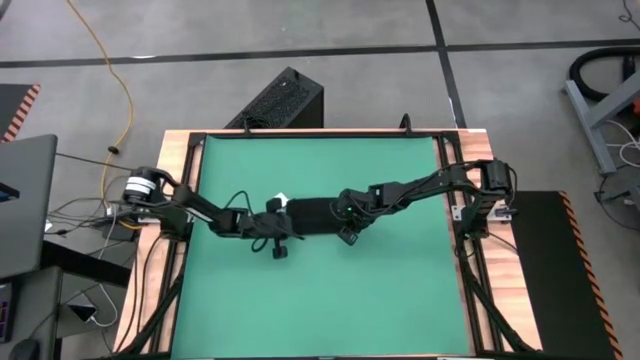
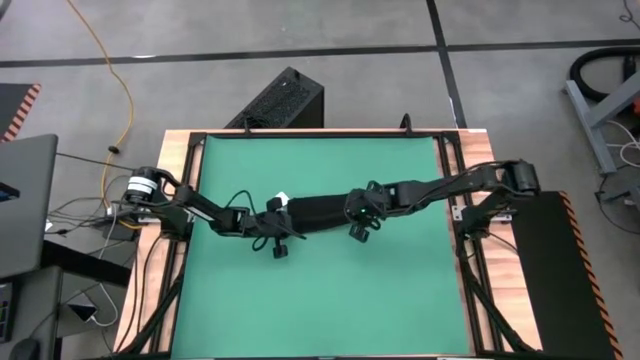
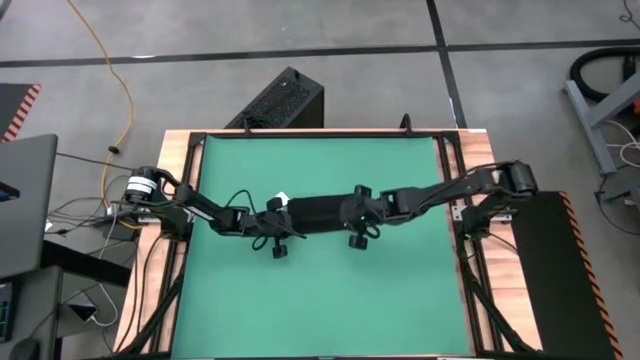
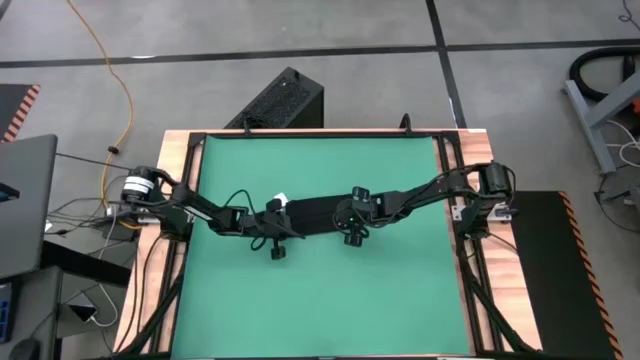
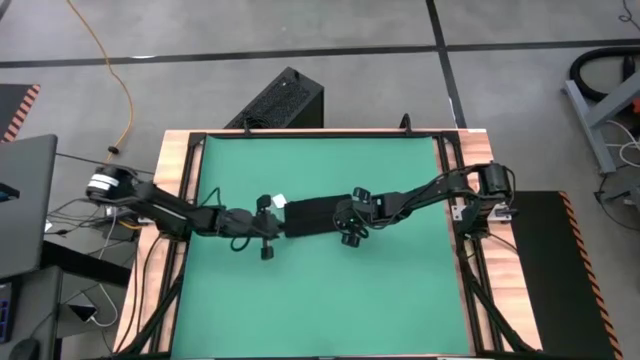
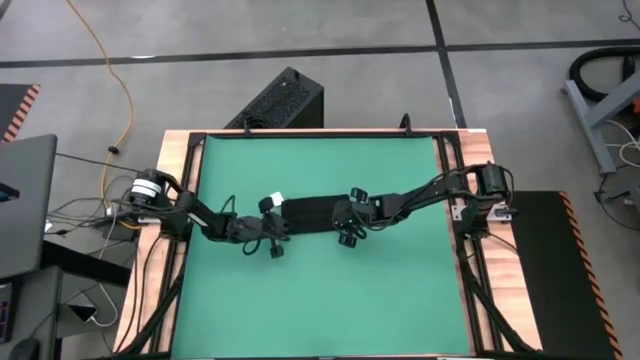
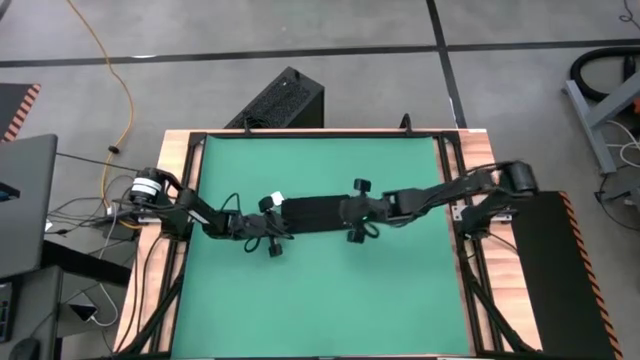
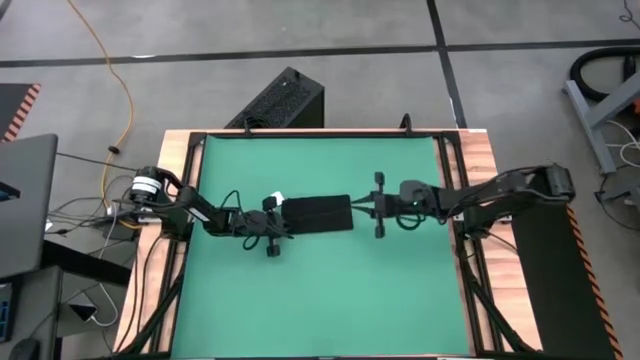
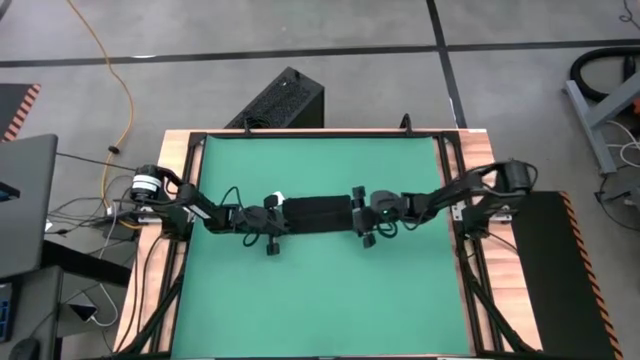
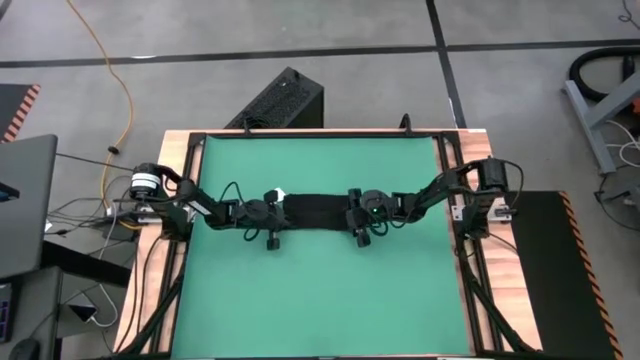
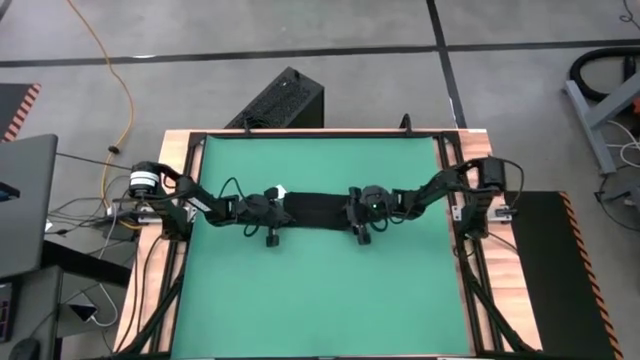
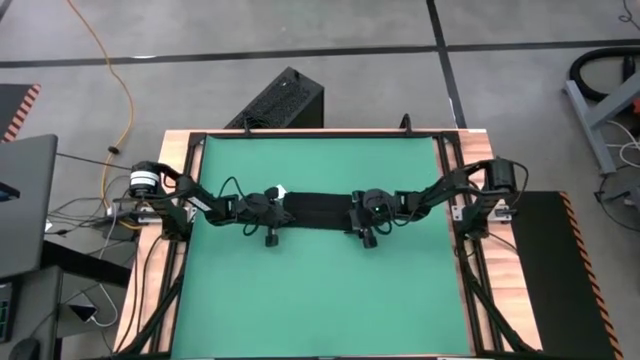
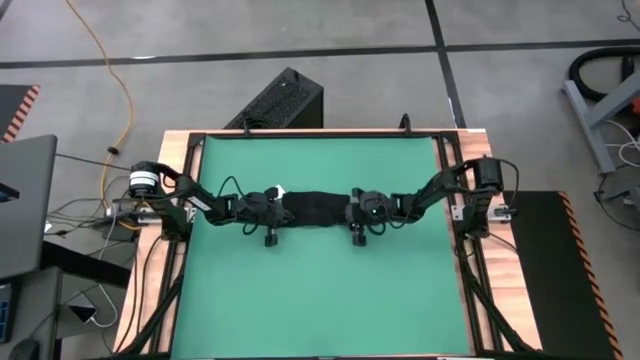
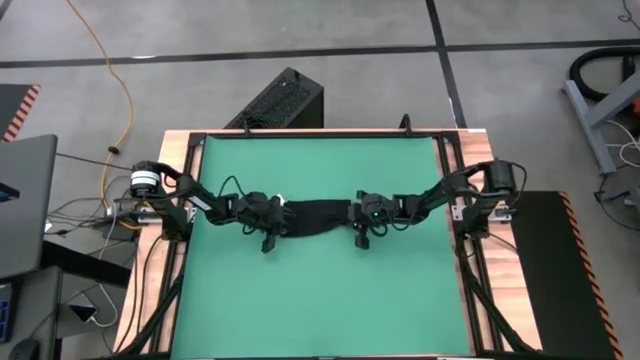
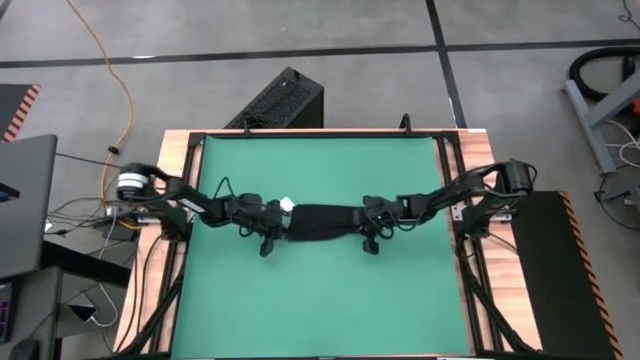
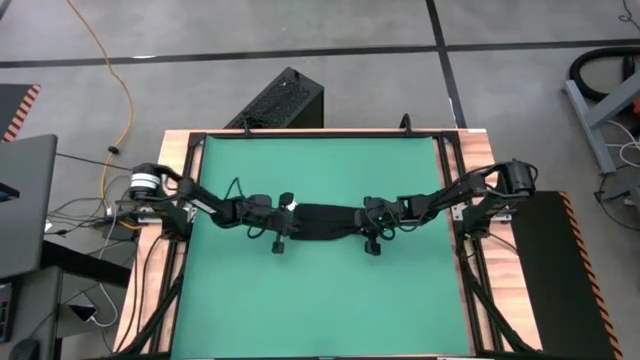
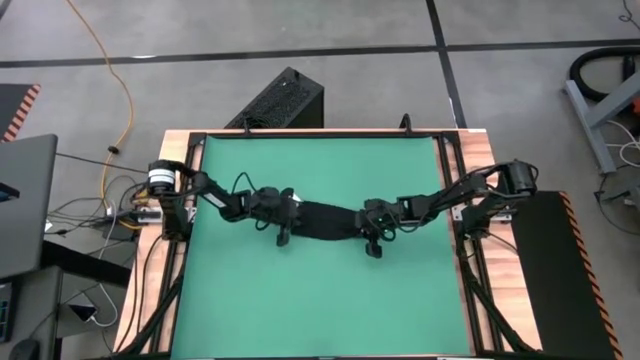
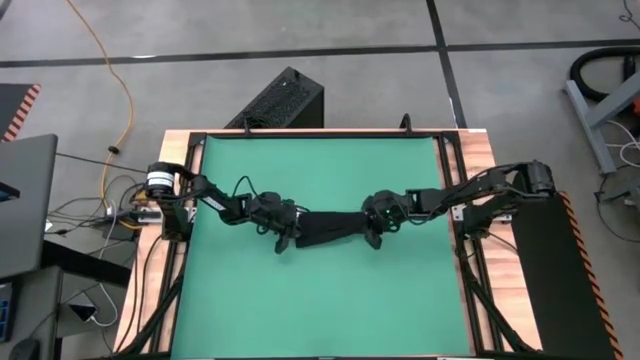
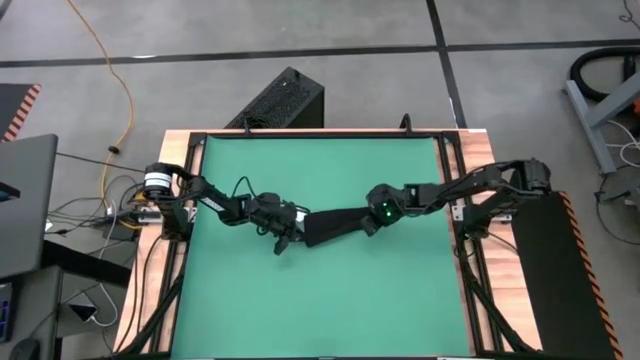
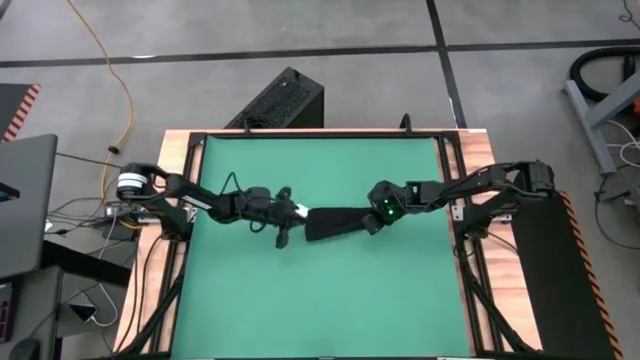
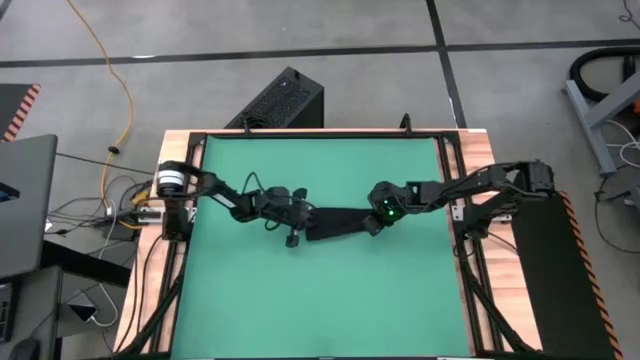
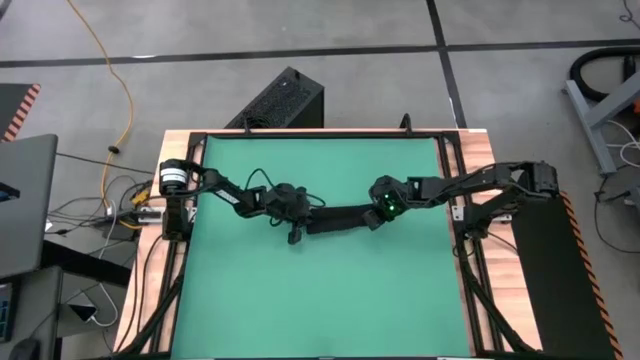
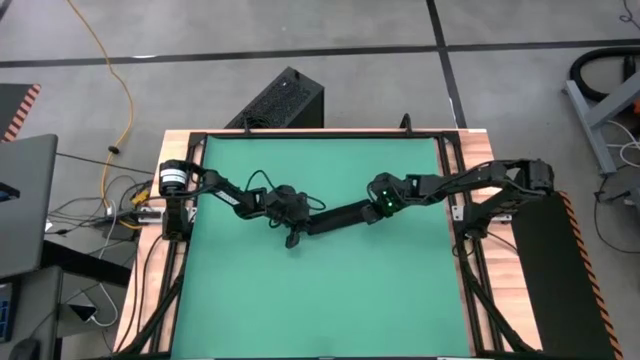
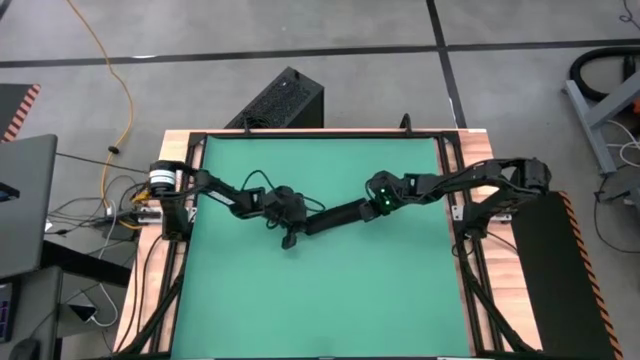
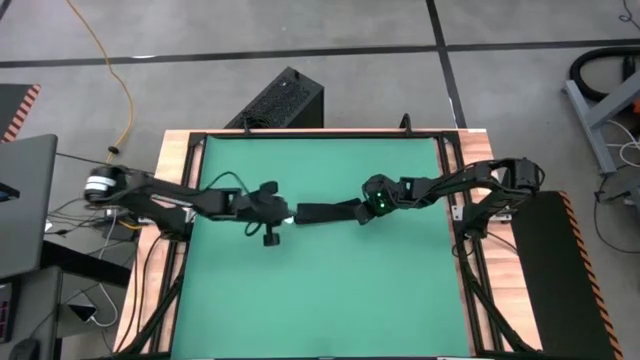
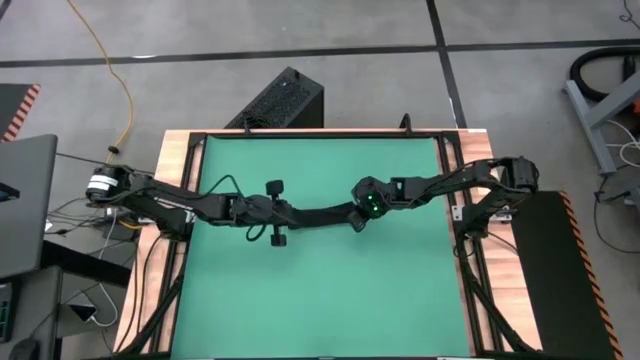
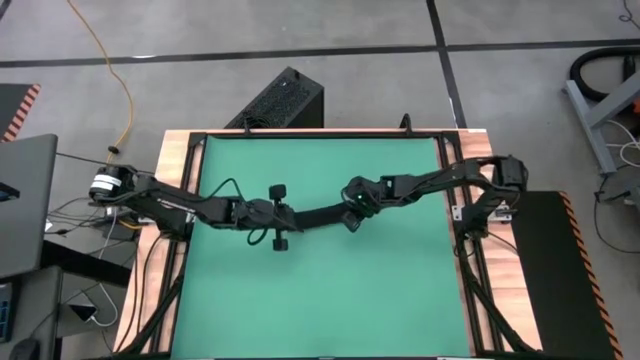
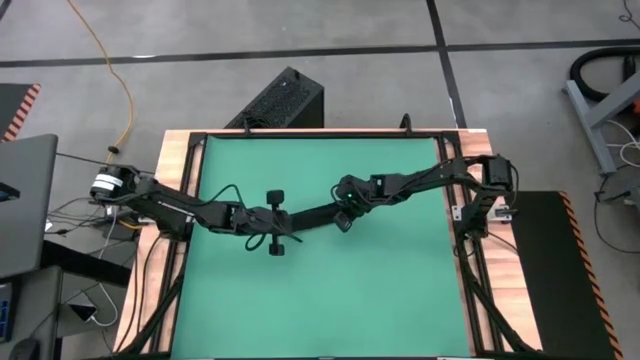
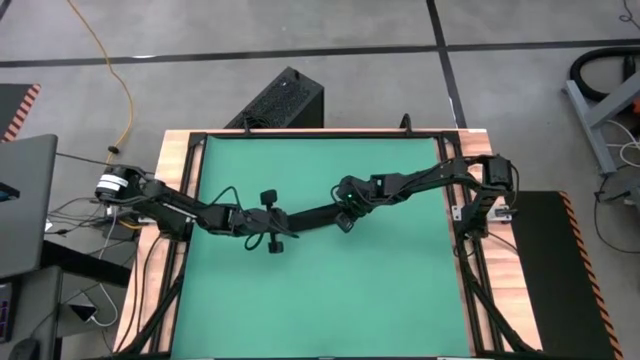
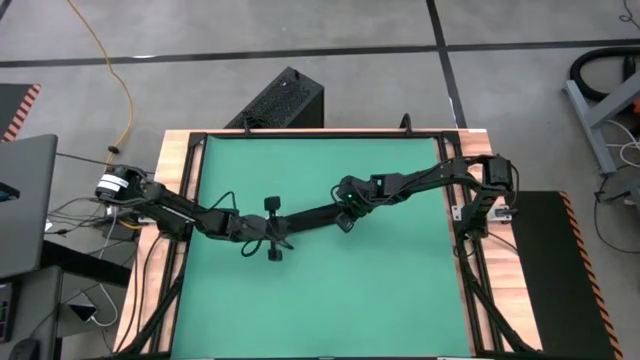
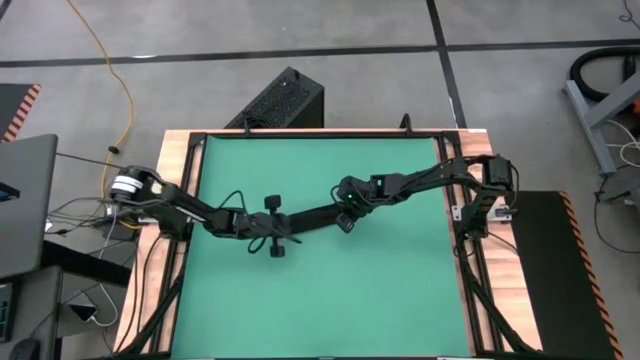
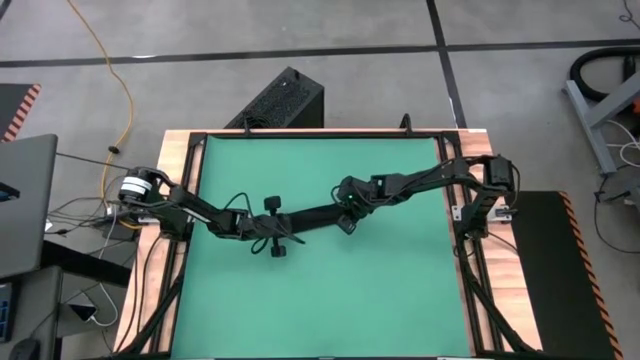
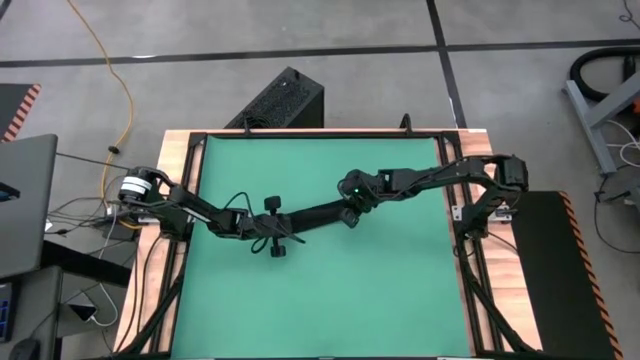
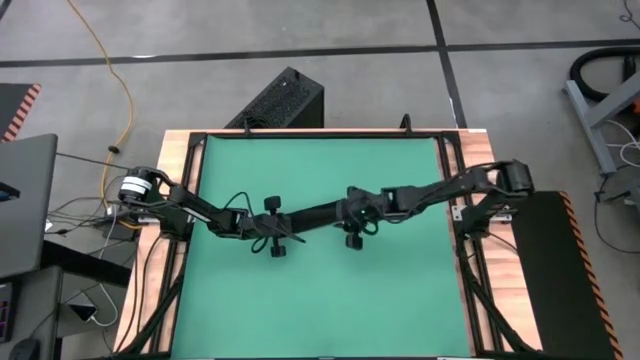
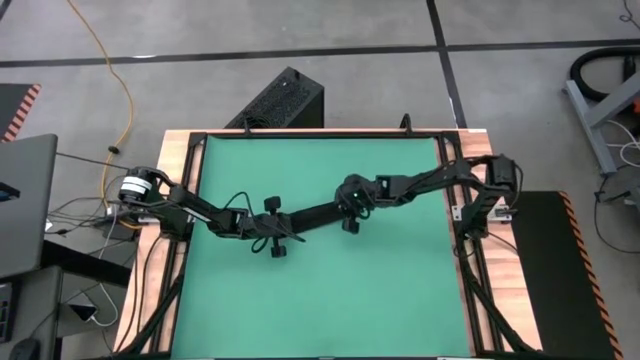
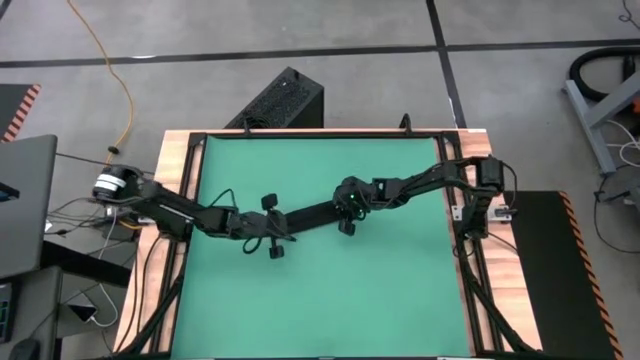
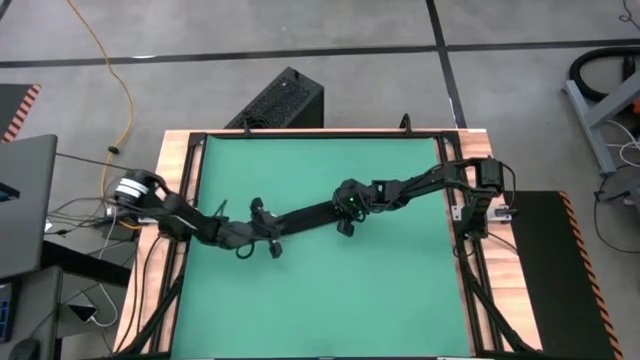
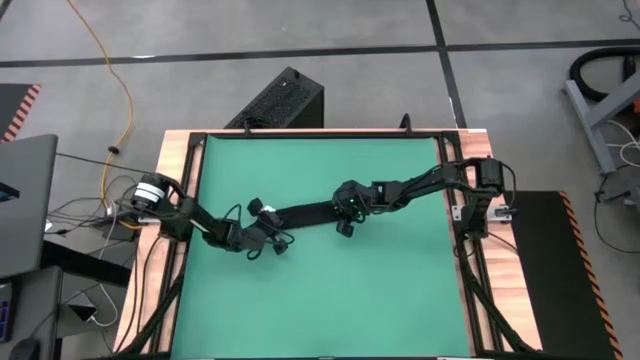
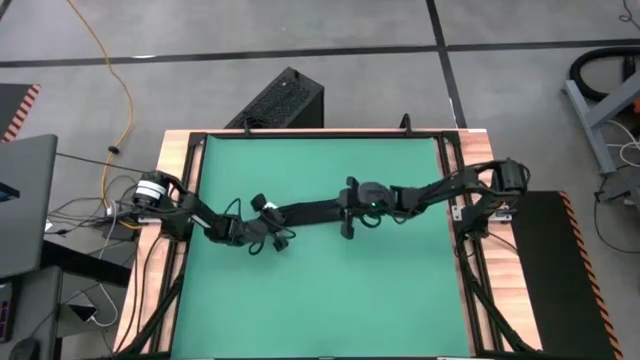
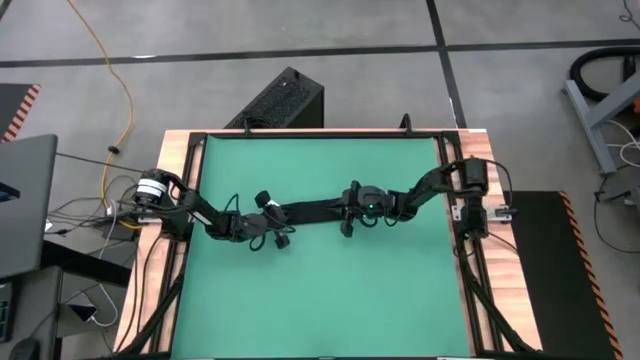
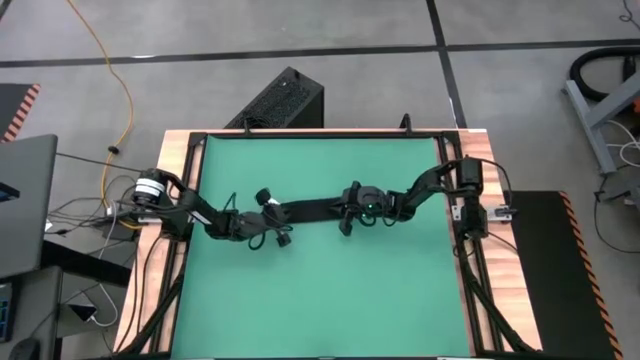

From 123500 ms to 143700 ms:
Task: Roll towel
Roll the black towel

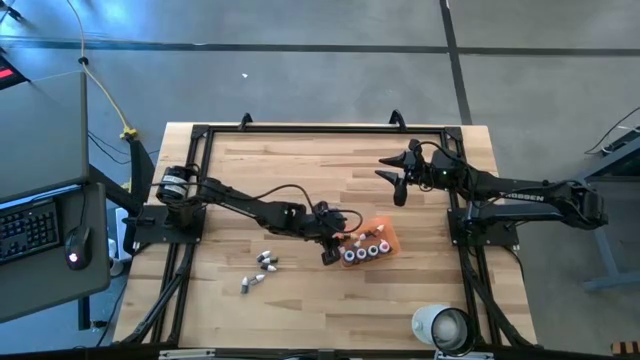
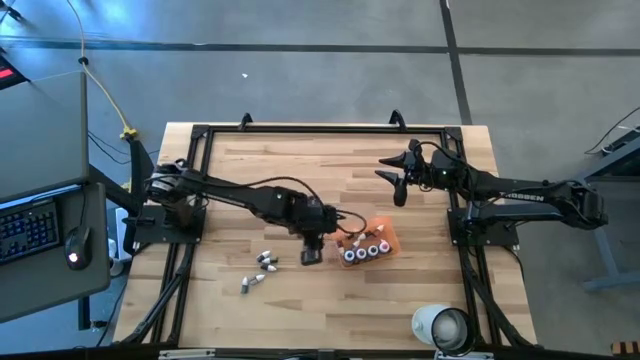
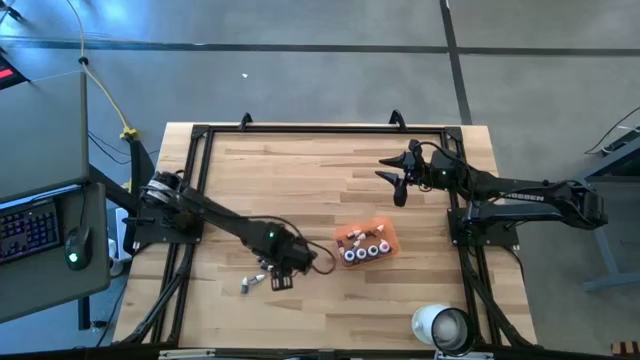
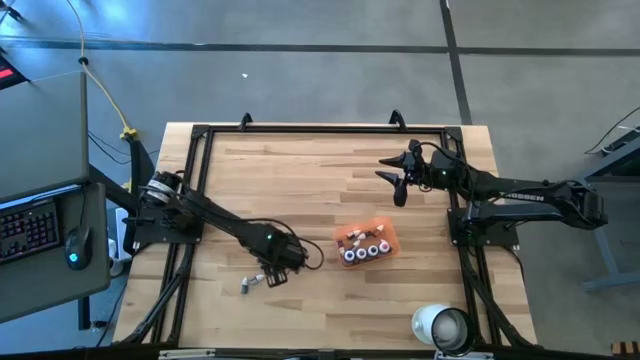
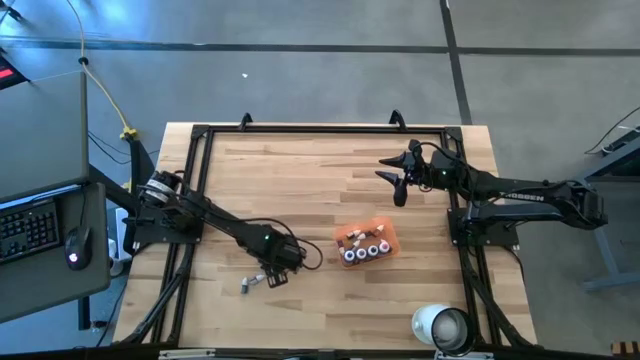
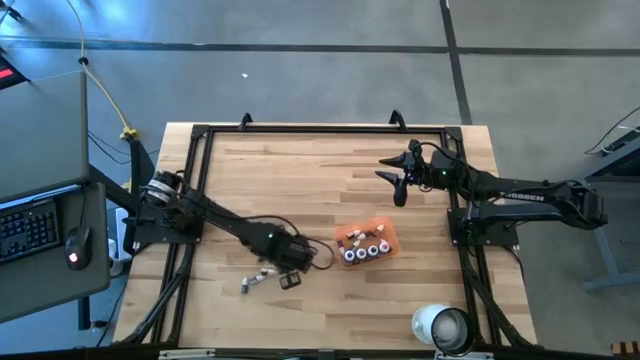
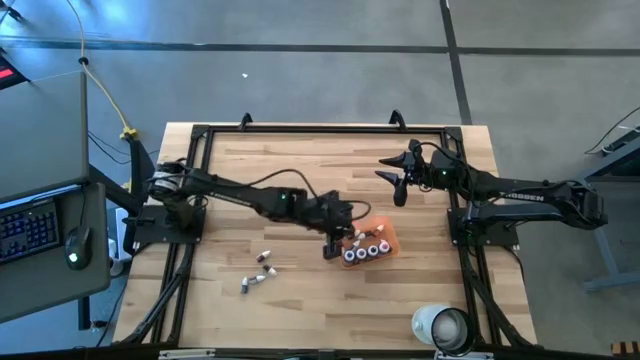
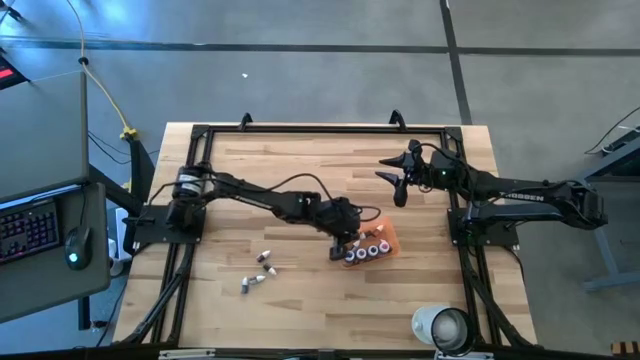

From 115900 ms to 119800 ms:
Task: Pick & Place food coloring
Put the top small green food coloring bottle into the orange bin
